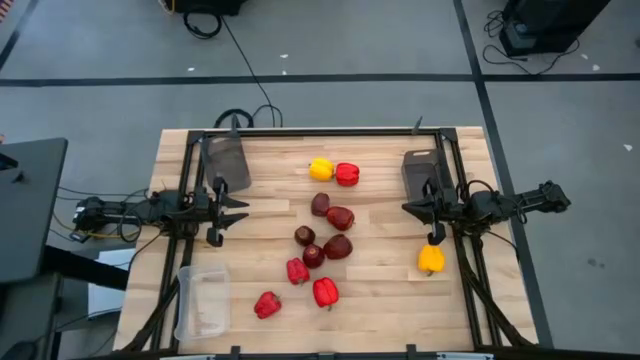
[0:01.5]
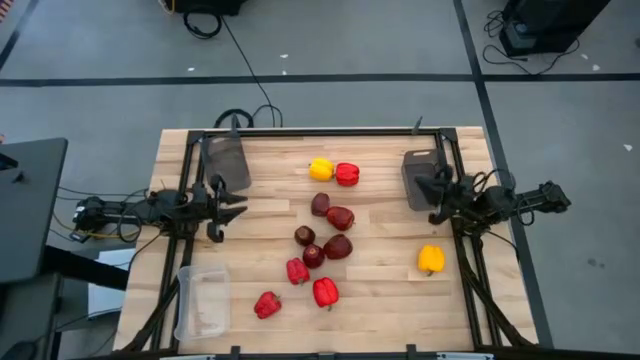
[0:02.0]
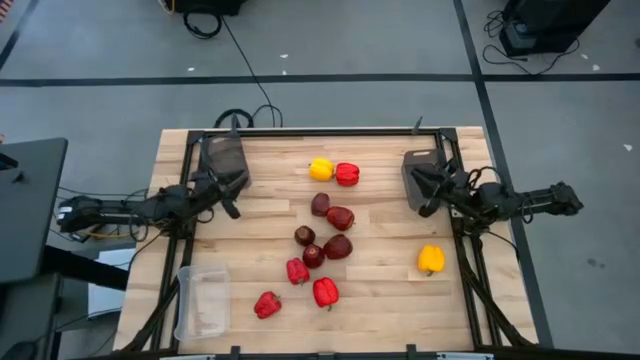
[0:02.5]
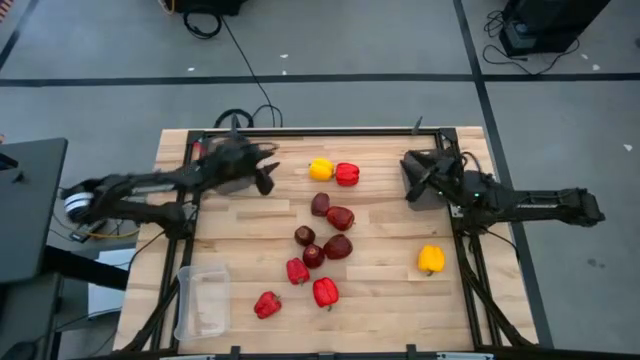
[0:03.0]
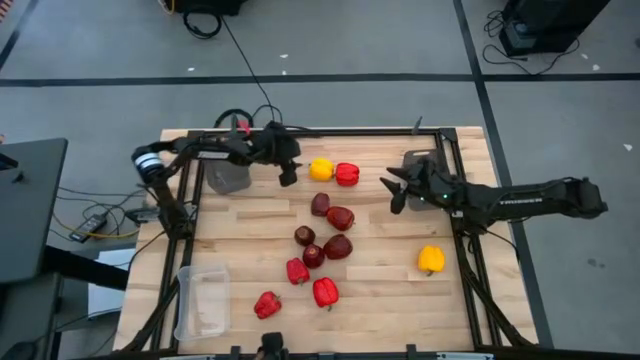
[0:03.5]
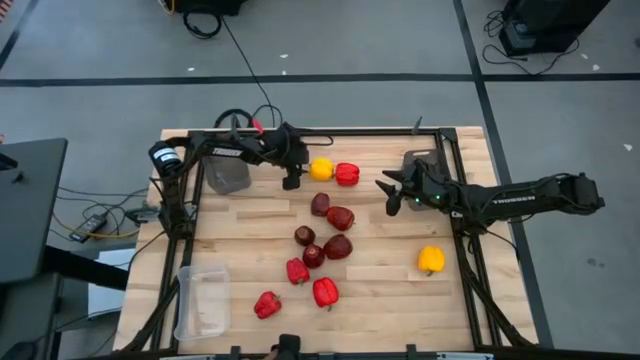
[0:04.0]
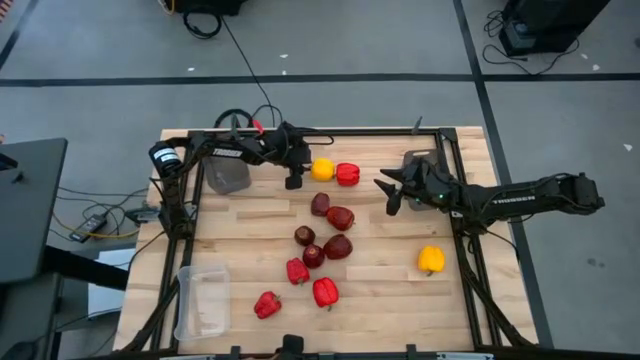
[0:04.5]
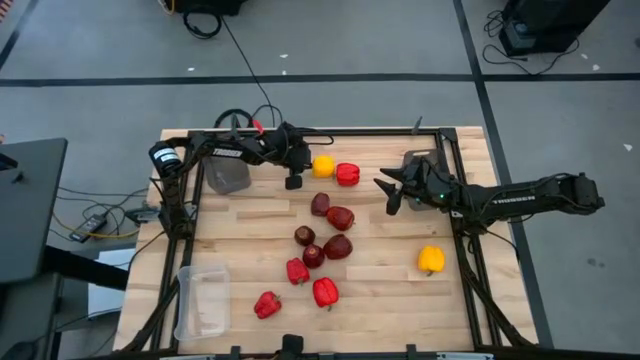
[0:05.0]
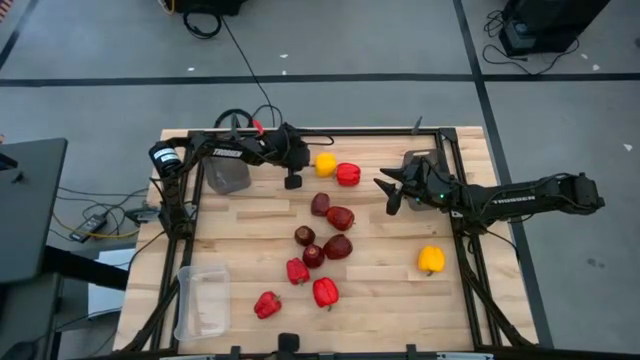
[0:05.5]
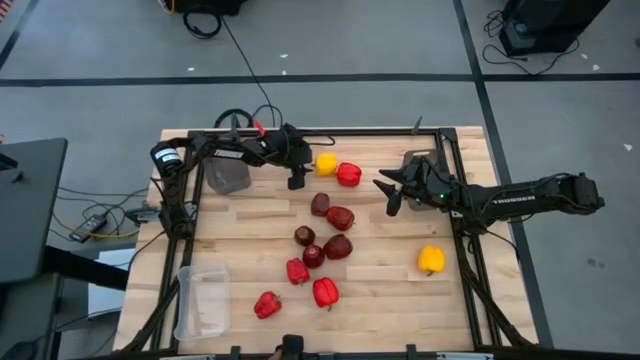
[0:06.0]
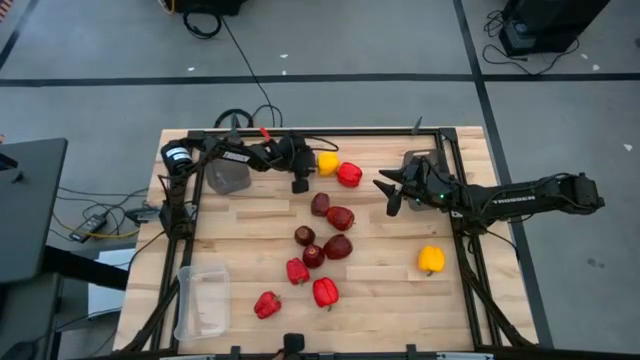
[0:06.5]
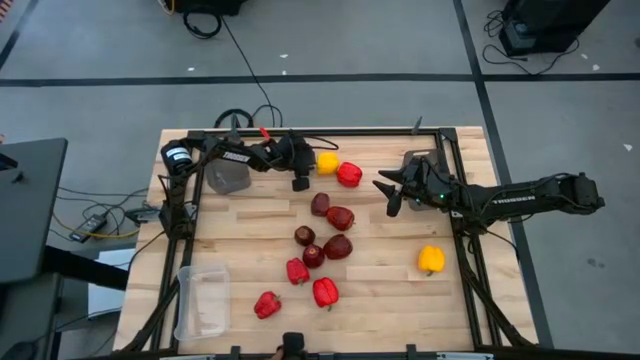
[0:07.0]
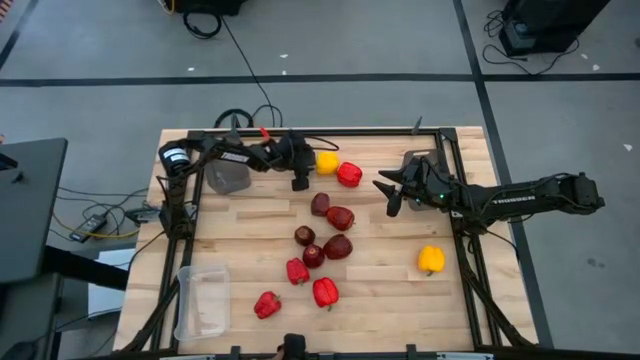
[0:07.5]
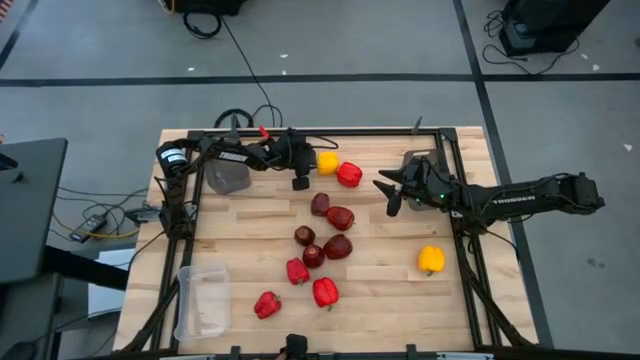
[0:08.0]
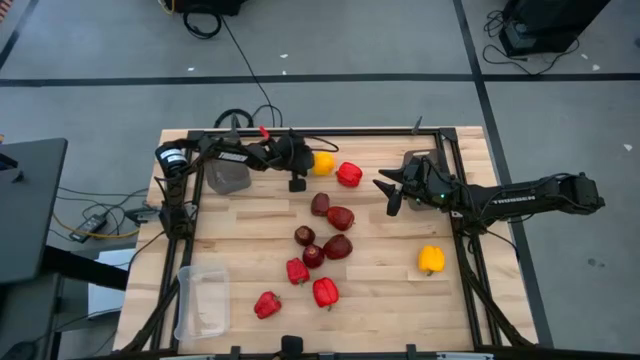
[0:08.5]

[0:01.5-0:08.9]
Task: Sort produce into baskets
Put the yellow bell pepper into the left black transparent bin

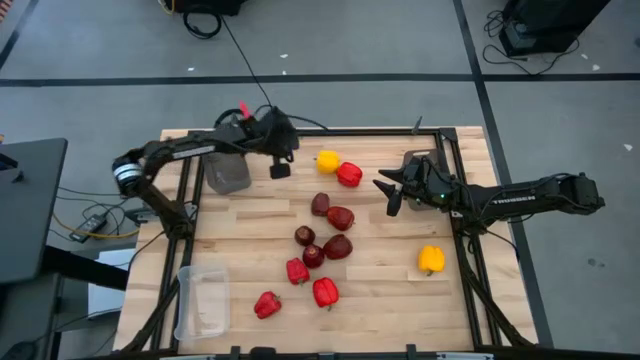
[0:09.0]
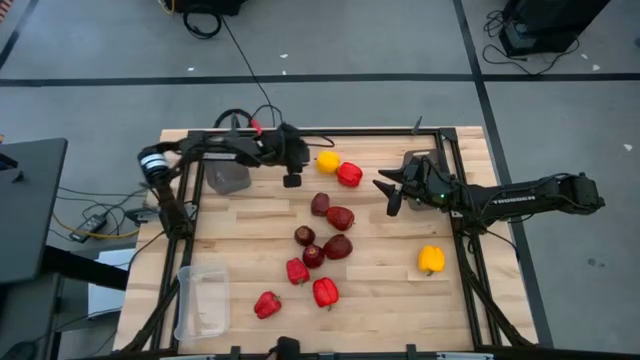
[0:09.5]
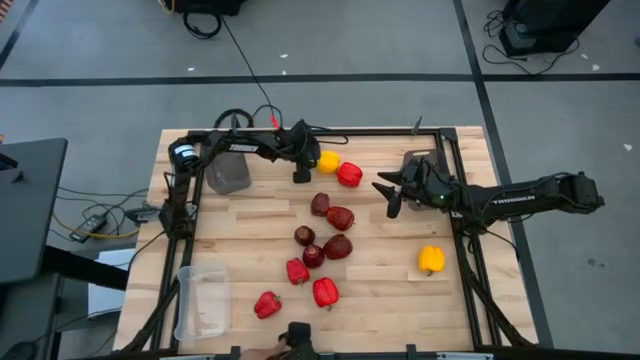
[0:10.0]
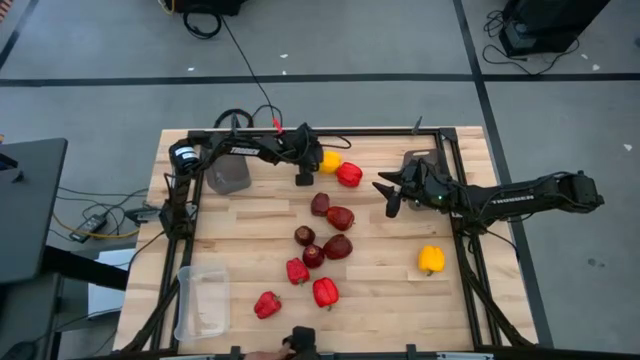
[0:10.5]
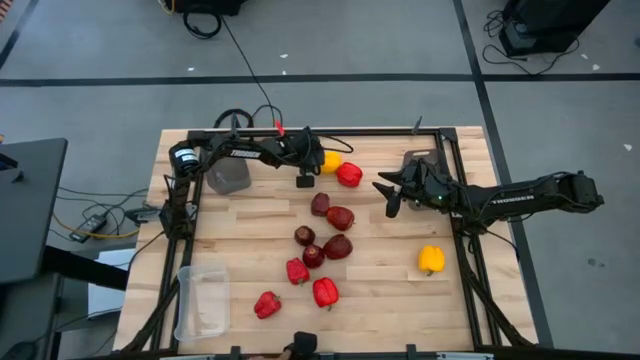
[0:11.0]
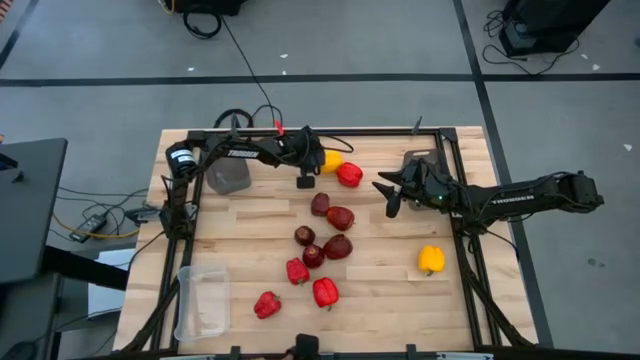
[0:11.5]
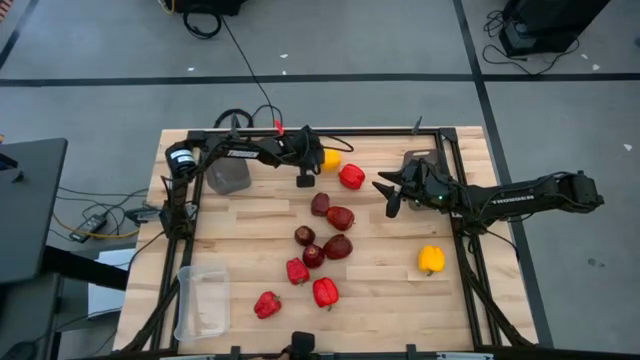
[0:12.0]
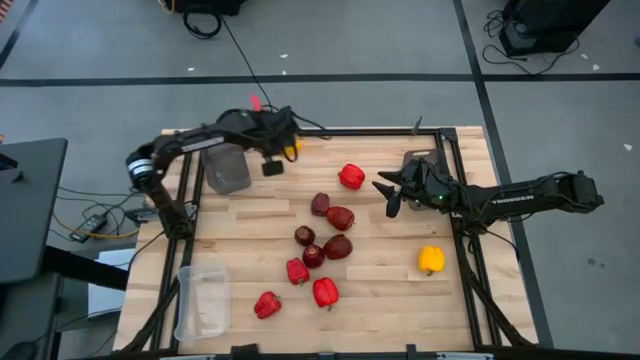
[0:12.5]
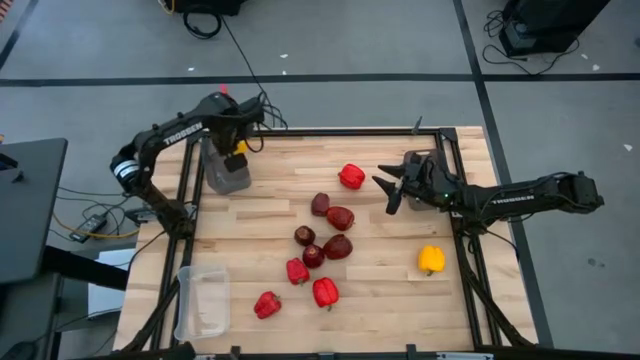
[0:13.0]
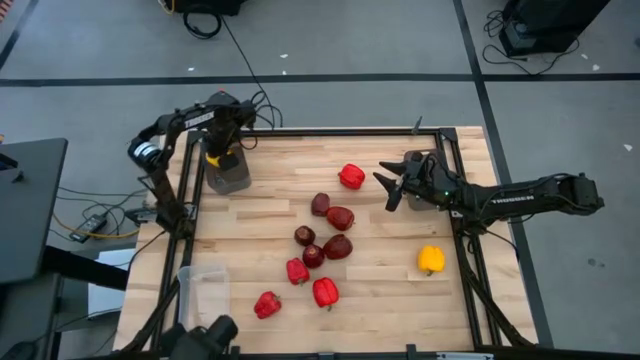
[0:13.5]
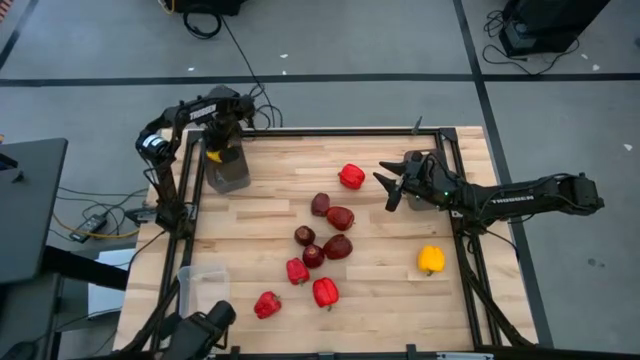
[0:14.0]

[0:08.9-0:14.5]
Put the yellow bell pepper into the left black transparent bin

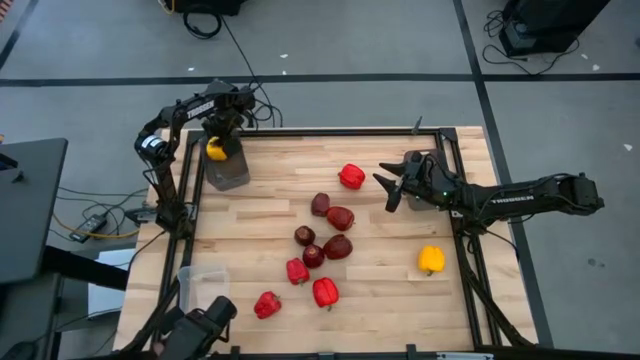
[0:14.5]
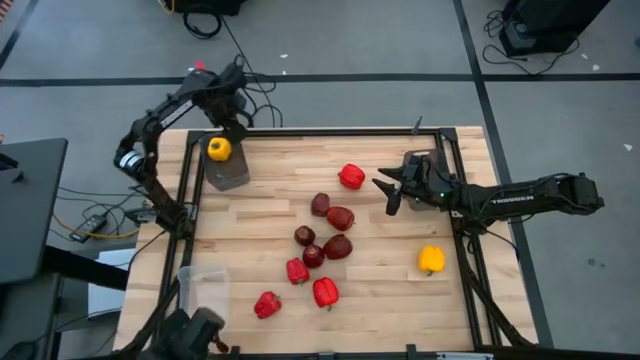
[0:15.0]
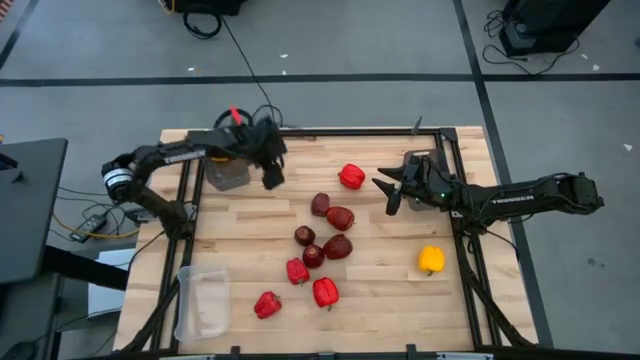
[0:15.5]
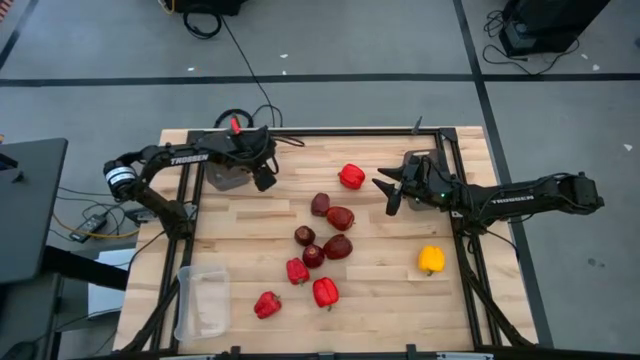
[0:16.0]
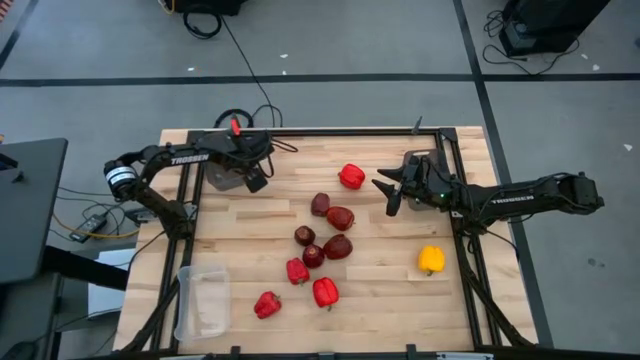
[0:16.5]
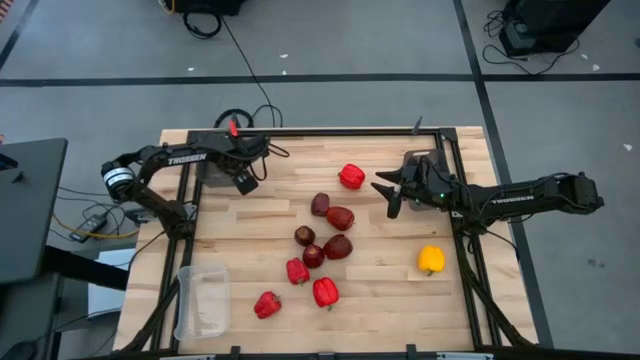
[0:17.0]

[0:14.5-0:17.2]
Adjust the left black transparent bin

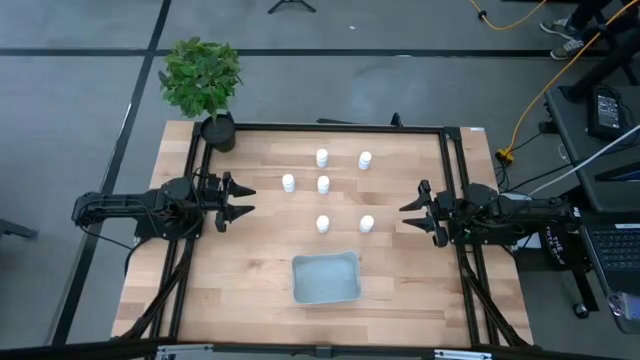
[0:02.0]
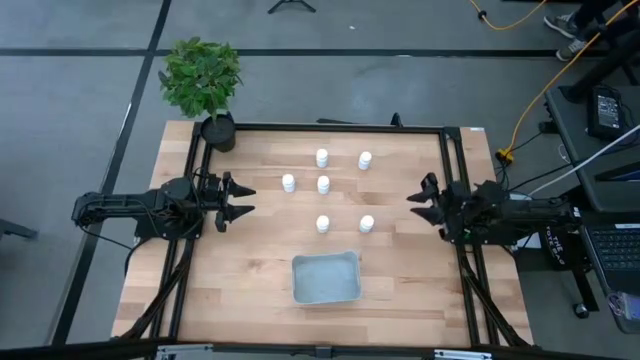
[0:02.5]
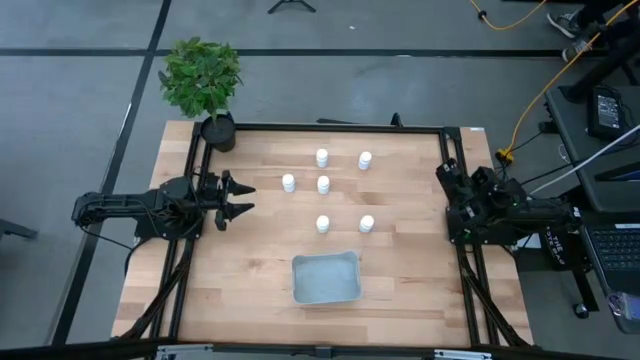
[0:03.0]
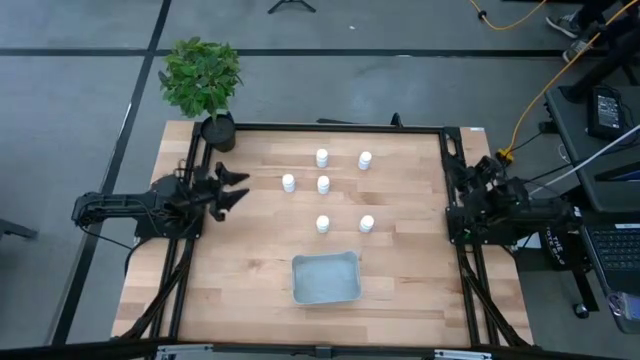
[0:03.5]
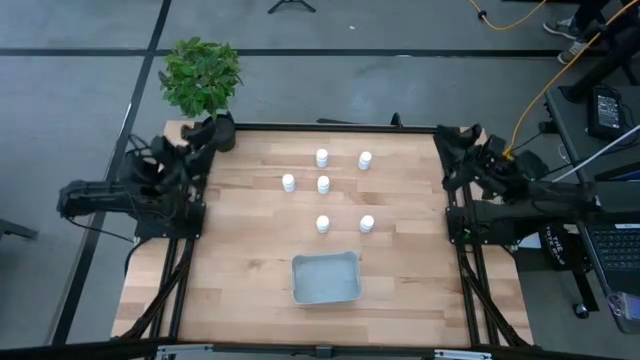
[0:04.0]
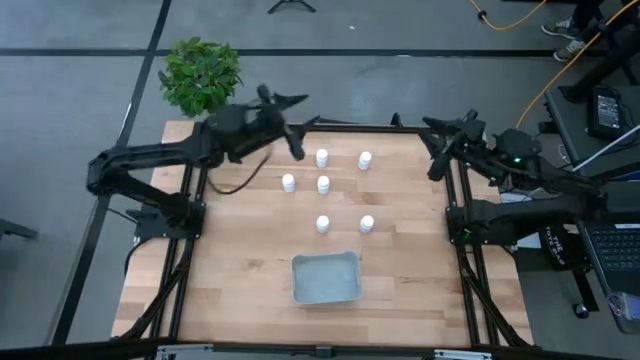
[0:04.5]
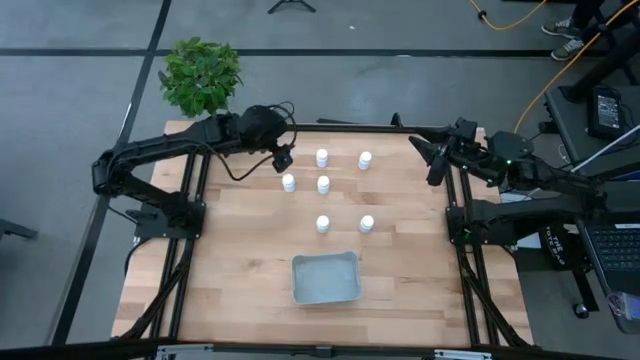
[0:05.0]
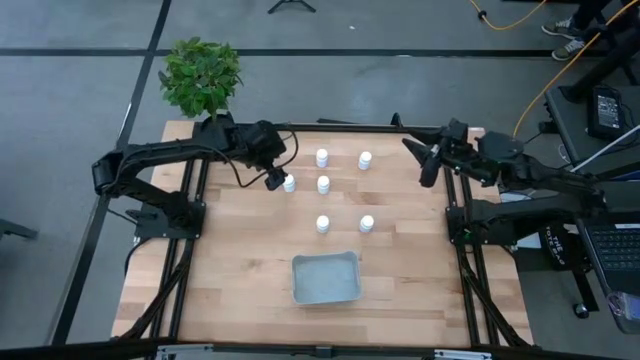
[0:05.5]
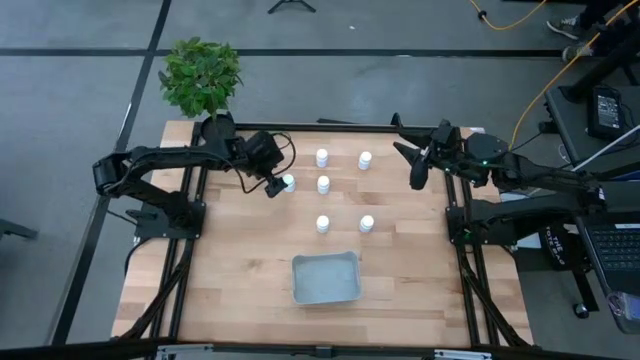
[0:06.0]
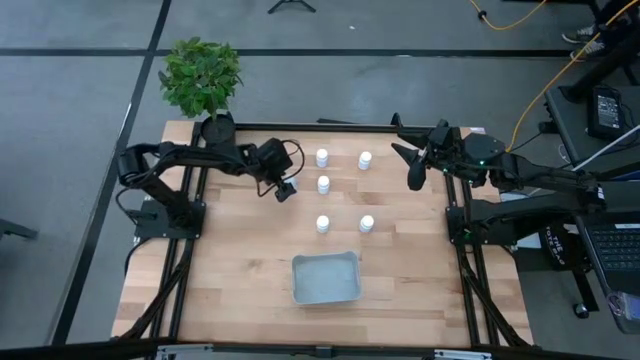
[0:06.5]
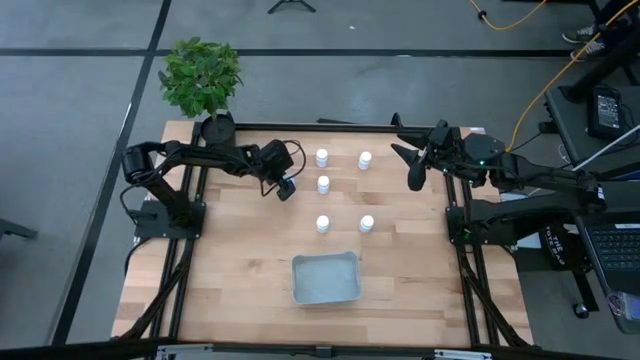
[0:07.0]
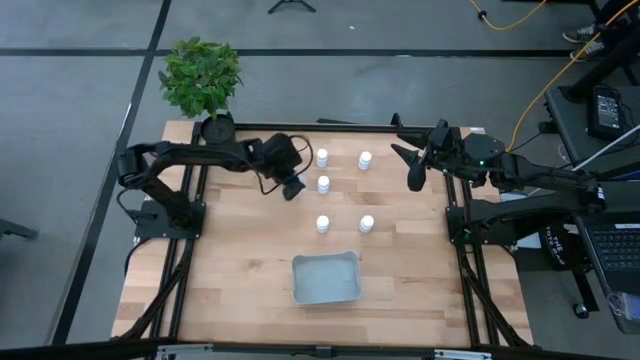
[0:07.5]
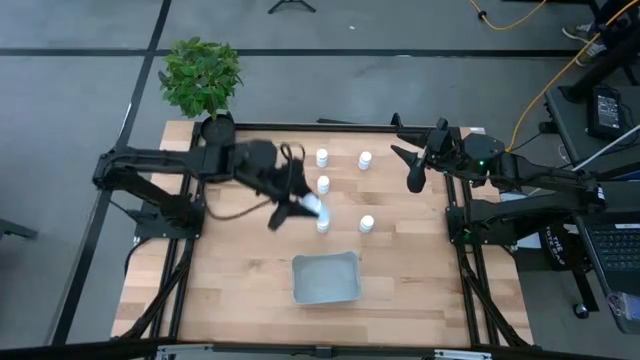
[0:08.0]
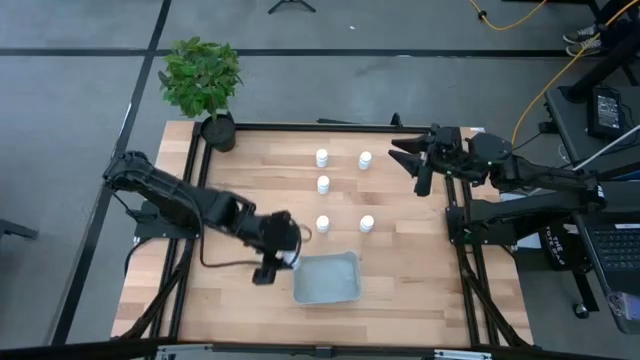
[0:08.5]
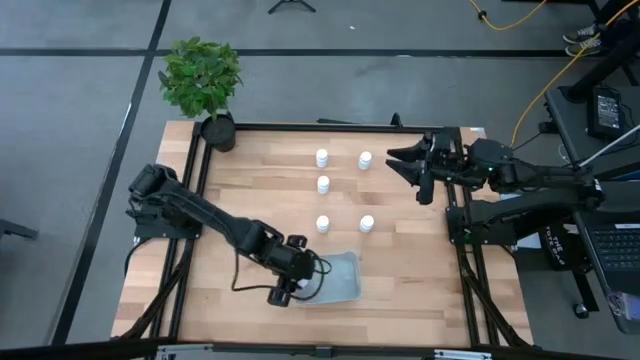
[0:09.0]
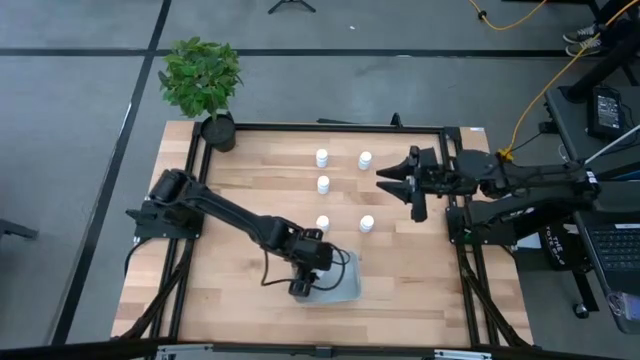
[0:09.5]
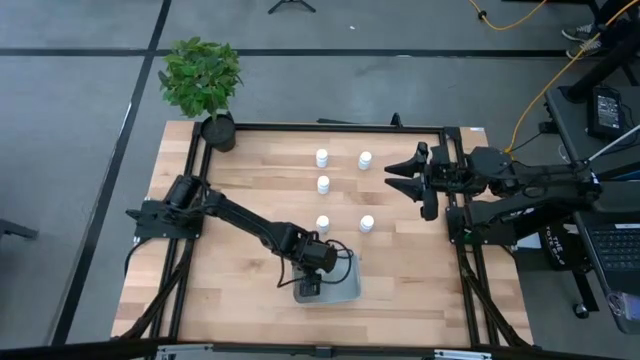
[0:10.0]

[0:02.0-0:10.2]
Task: Pick and place pill bottles into a basket
Put the white medicine bottle into the gray bin
